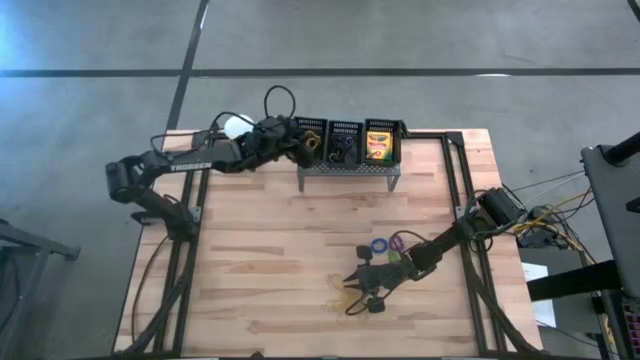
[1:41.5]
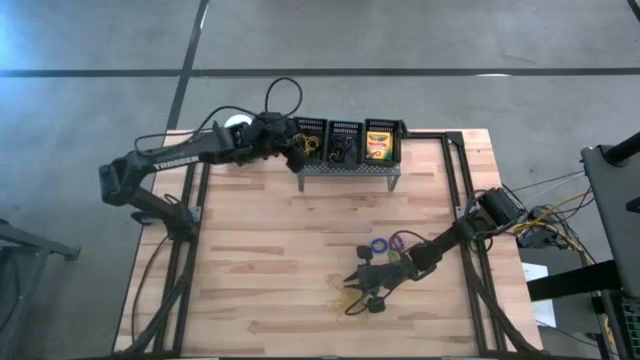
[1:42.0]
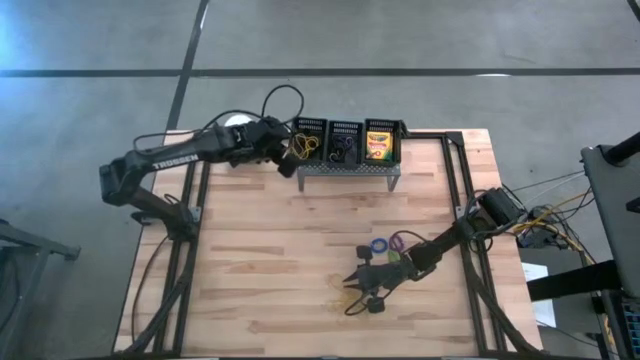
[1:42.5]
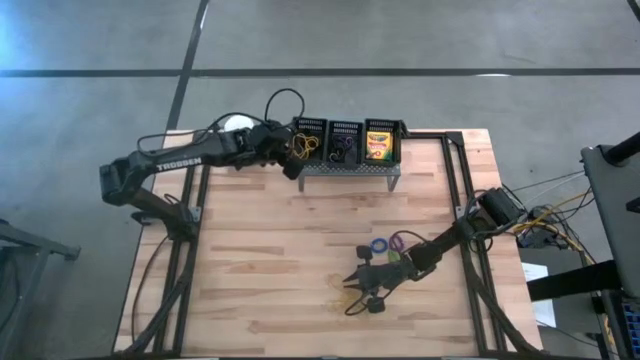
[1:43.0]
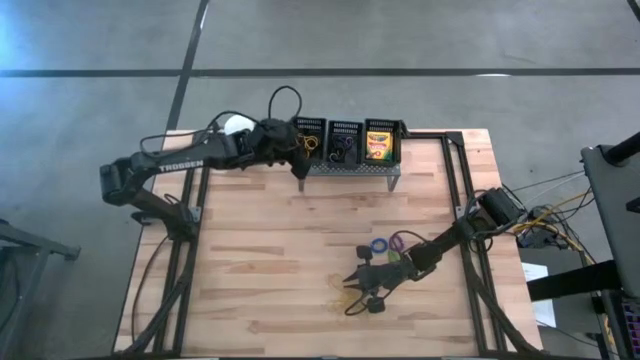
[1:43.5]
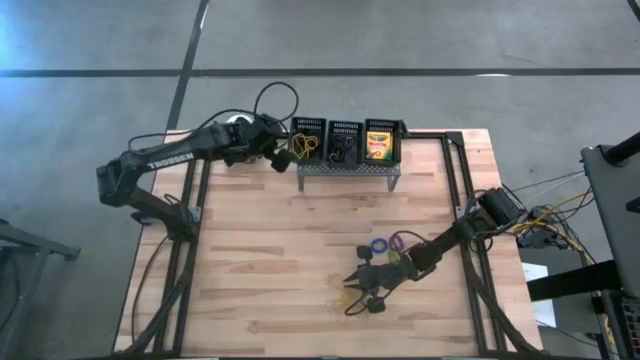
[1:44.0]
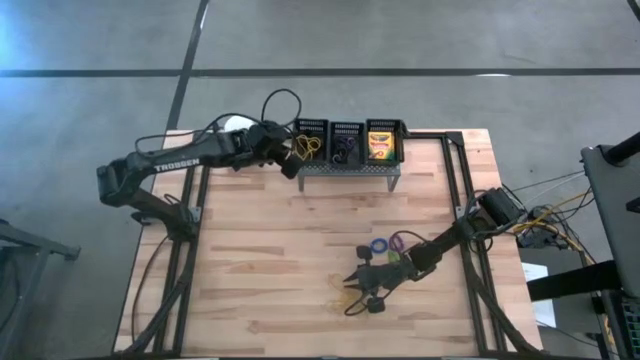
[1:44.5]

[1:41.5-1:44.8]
Task: Pick & Place Office Desk Supplies
Adjust the left black bin on the shelf

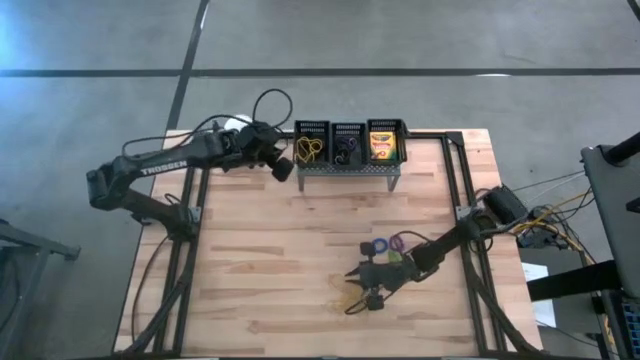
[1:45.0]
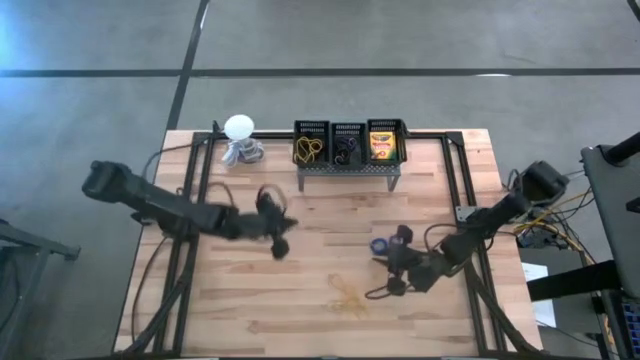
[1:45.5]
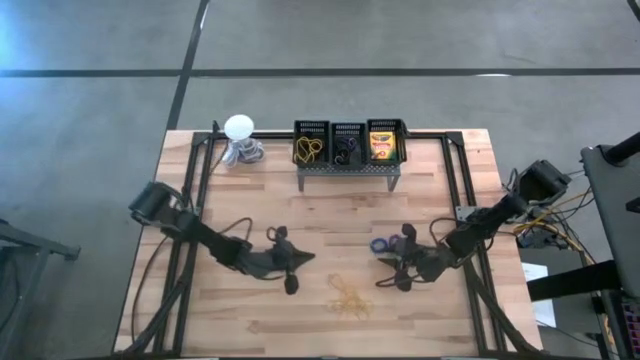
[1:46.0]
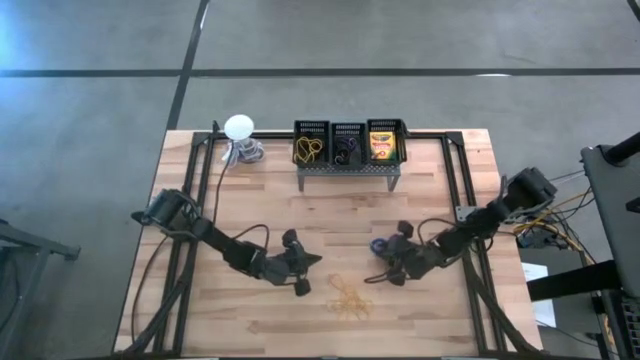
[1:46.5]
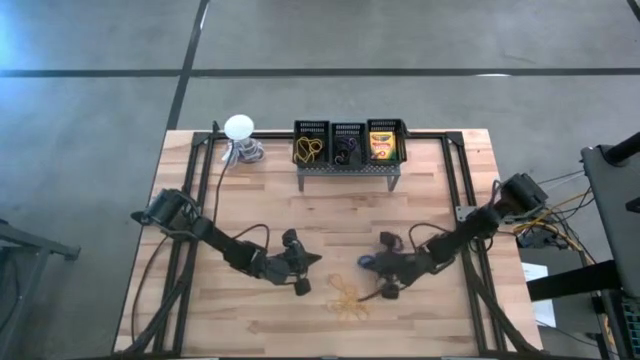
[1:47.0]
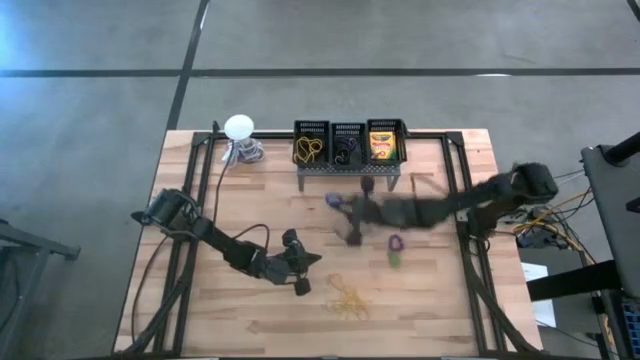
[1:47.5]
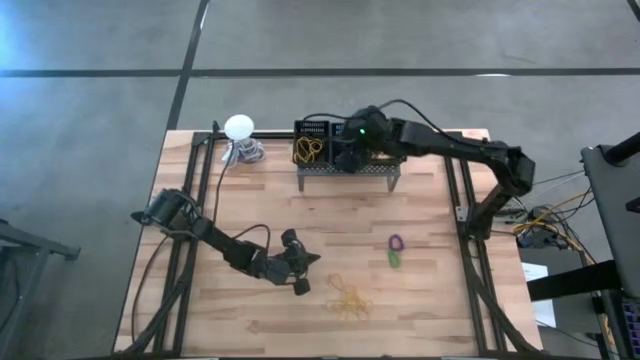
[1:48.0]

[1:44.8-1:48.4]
Put the blue keychain into the middle black bin on the shelf

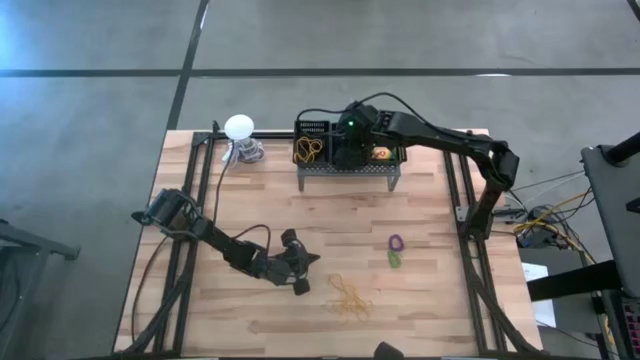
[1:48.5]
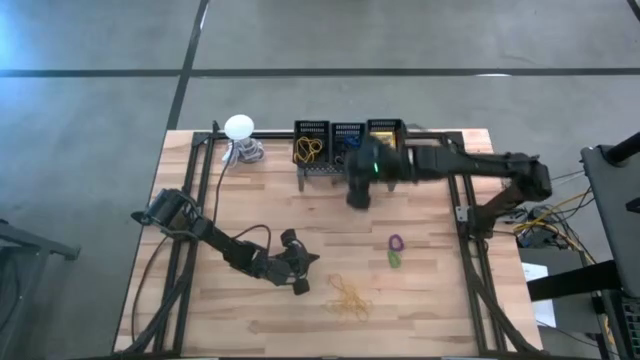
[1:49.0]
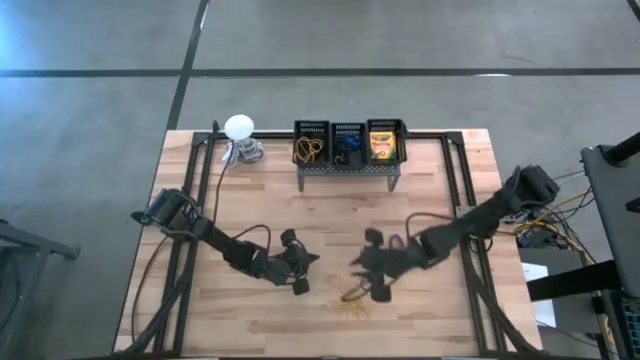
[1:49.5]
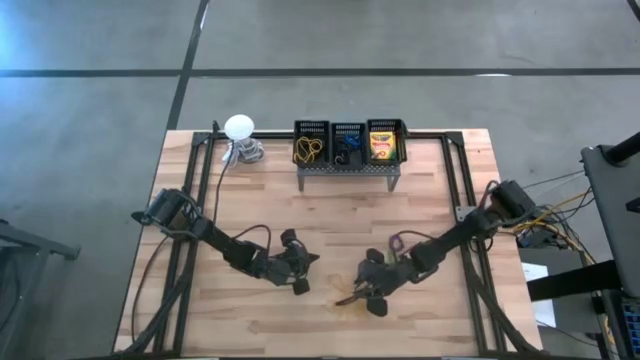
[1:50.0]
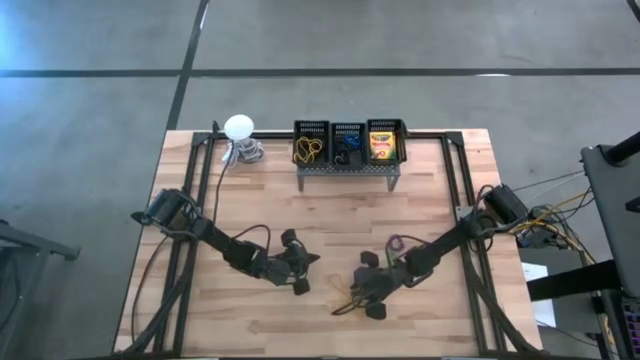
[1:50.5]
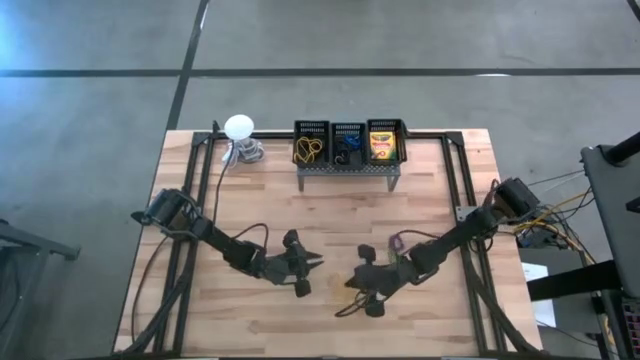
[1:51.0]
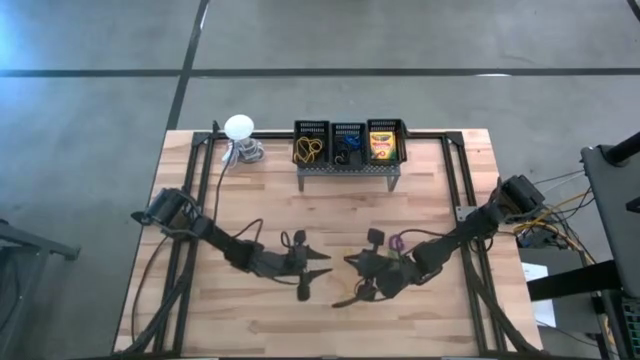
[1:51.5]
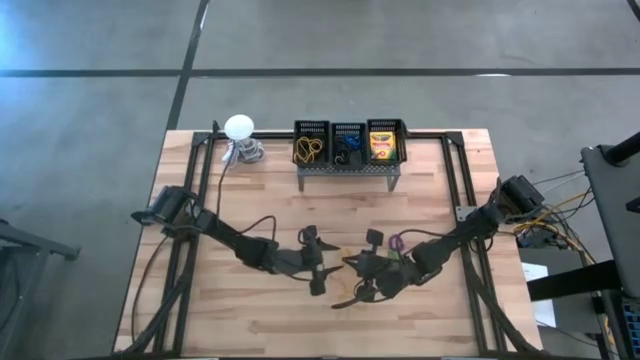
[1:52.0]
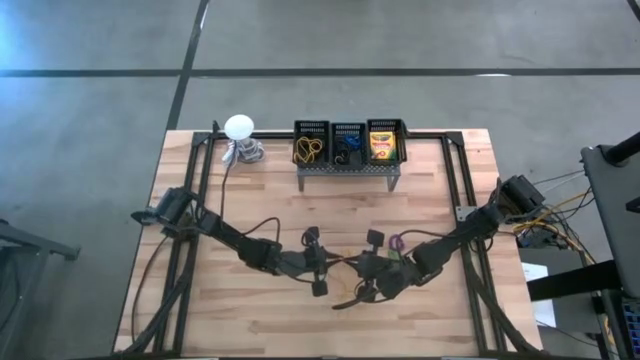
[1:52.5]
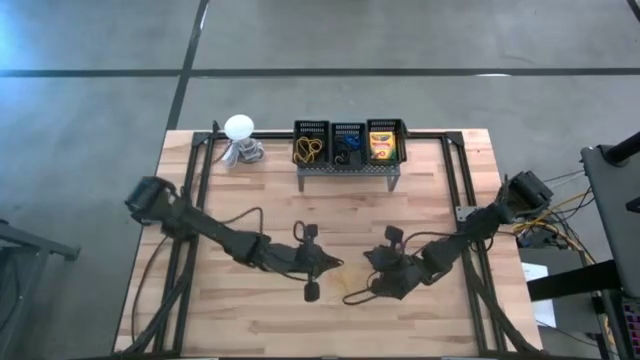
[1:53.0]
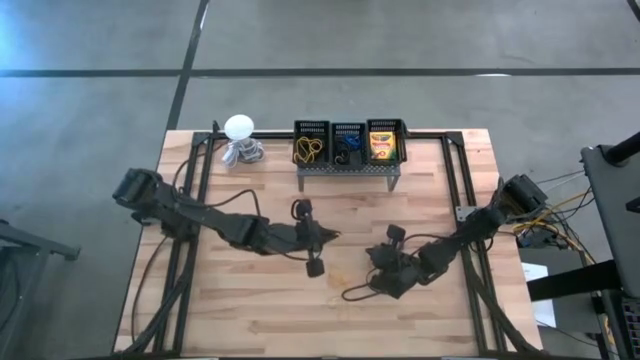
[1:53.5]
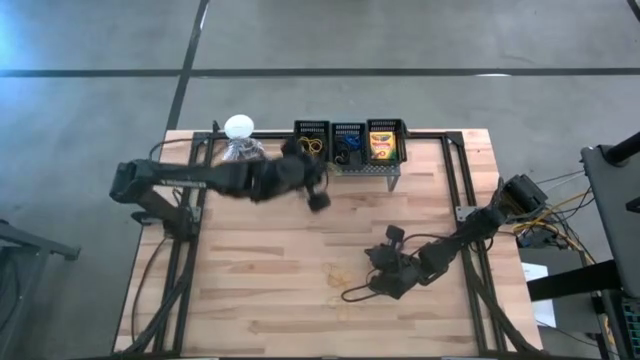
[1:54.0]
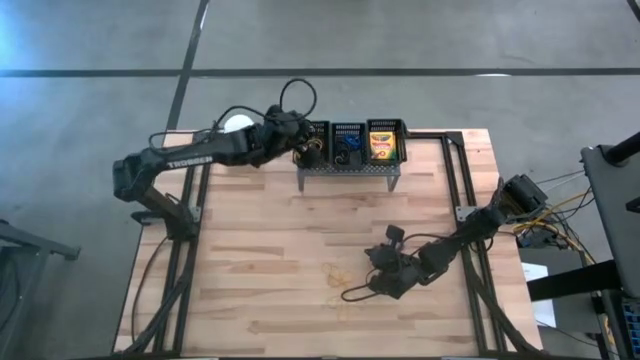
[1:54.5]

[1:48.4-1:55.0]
Put the yellow rubber band into the left black bin on the shelf

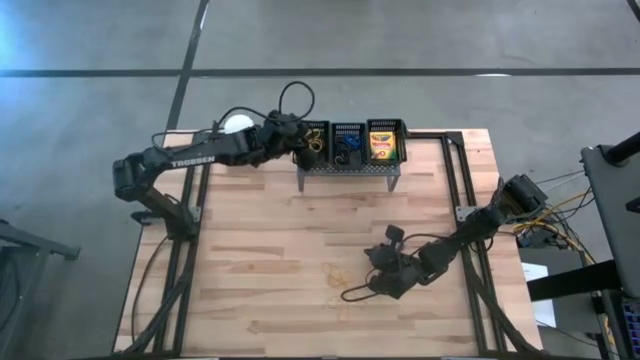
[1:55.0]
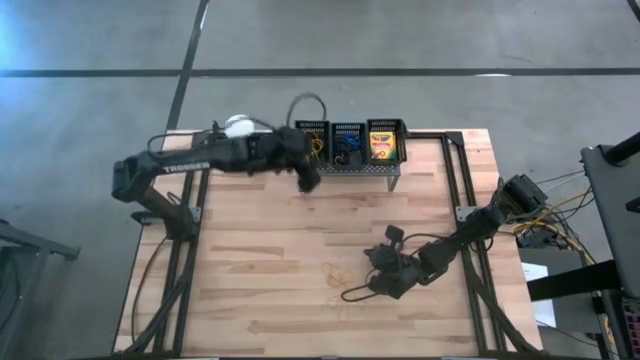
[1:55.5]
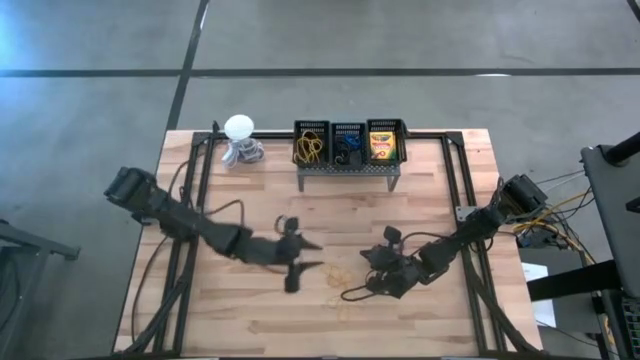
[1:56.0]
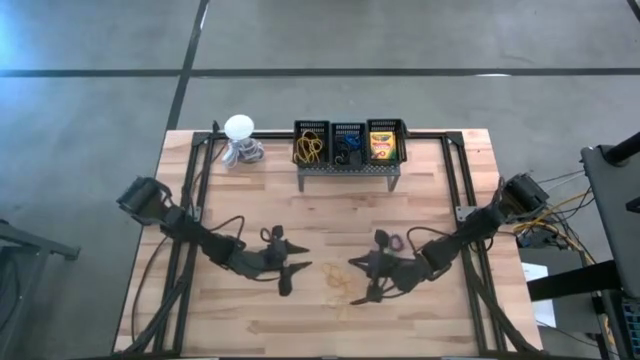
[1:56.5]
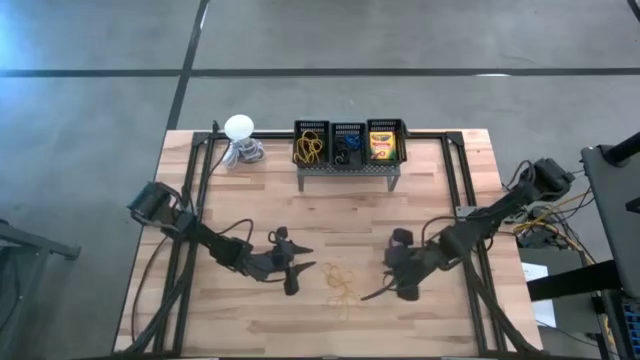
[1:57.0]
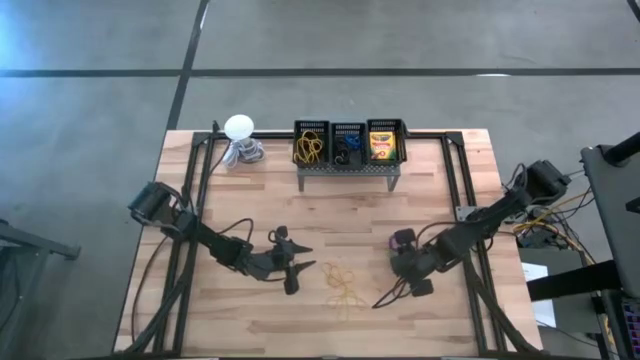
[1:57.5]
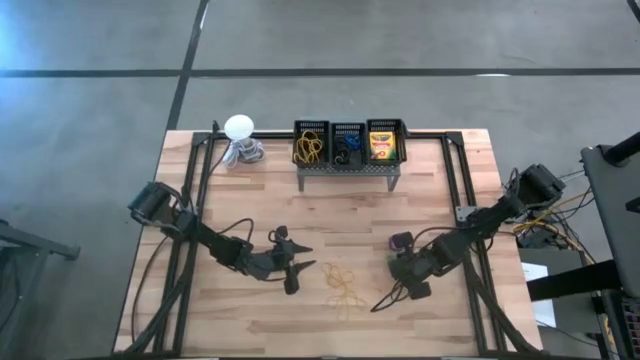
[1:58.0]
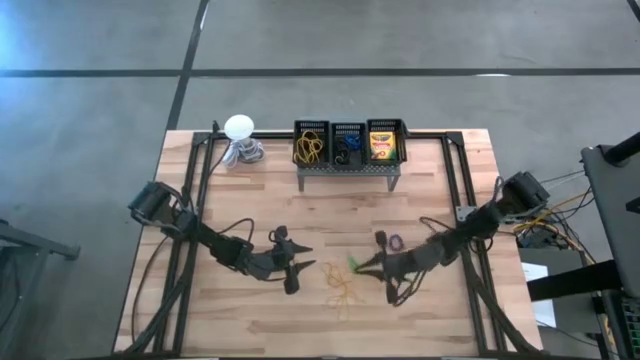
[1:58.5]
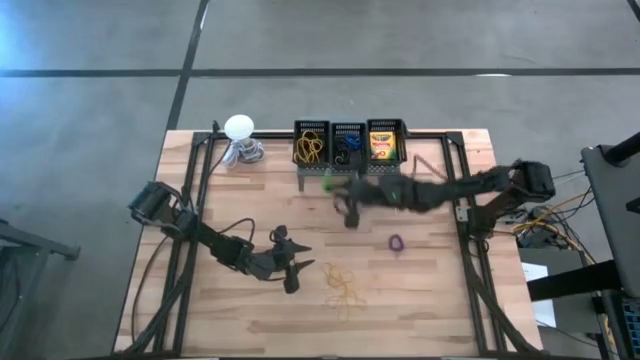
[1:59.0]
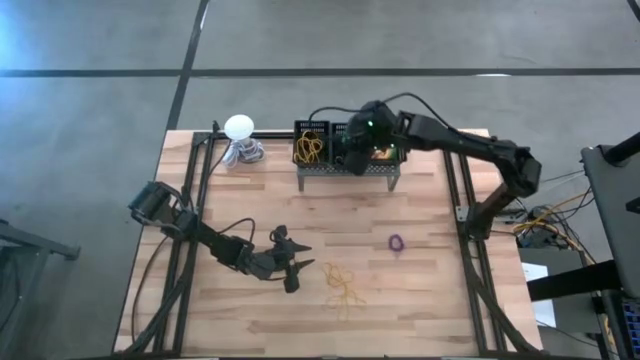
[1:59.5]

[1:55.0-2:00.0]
Put the green keychain into the middle black bin on the shelf

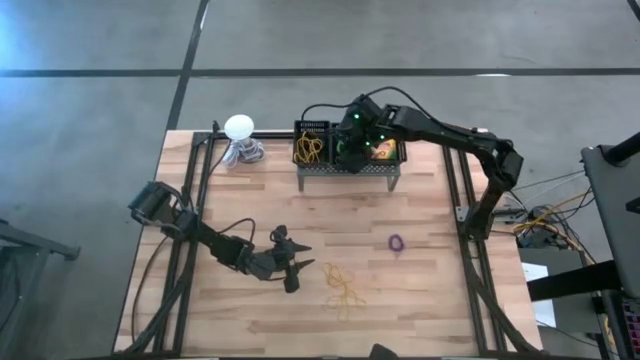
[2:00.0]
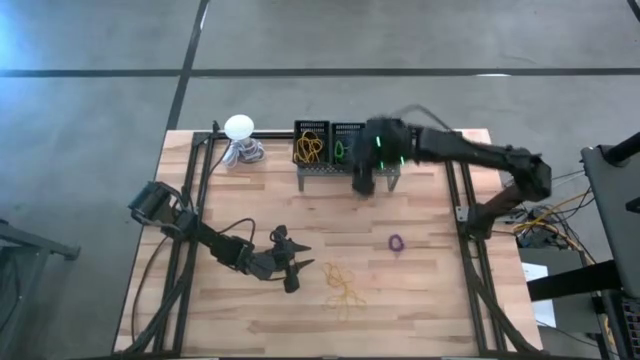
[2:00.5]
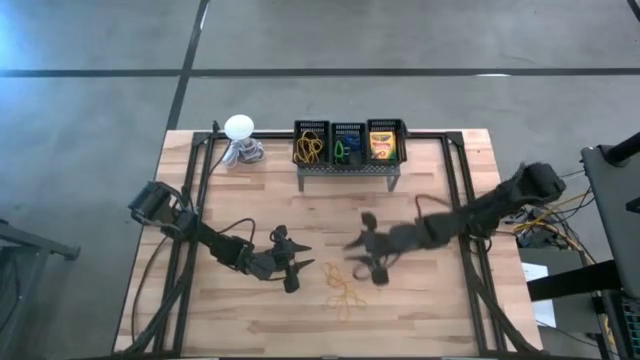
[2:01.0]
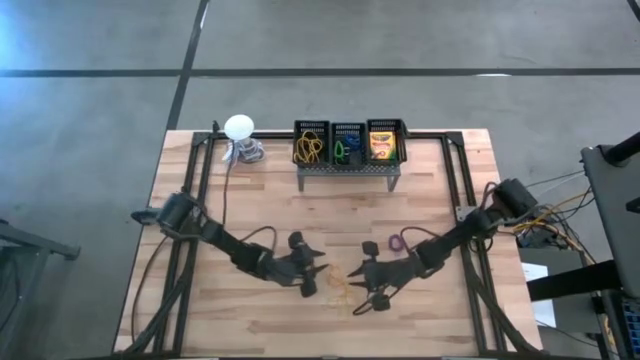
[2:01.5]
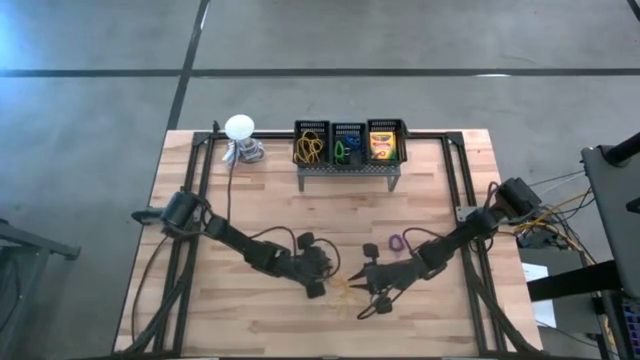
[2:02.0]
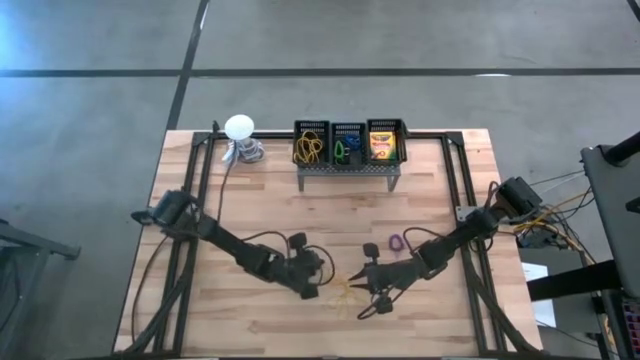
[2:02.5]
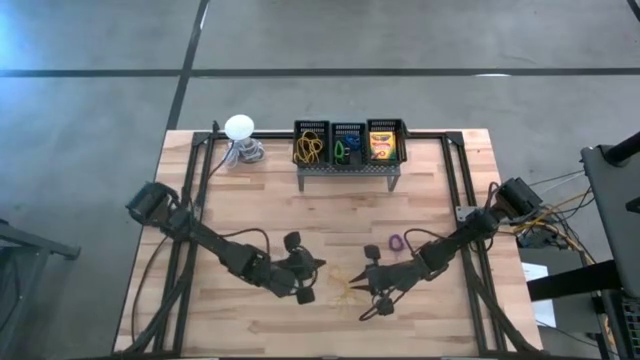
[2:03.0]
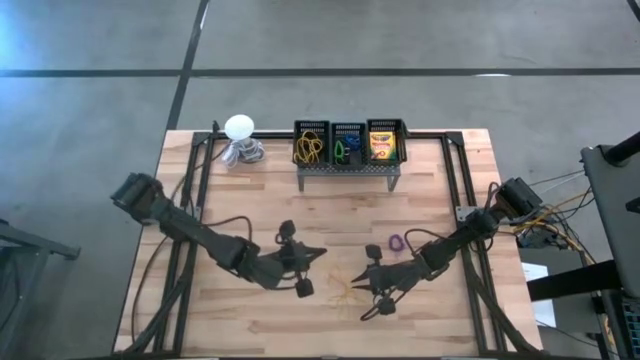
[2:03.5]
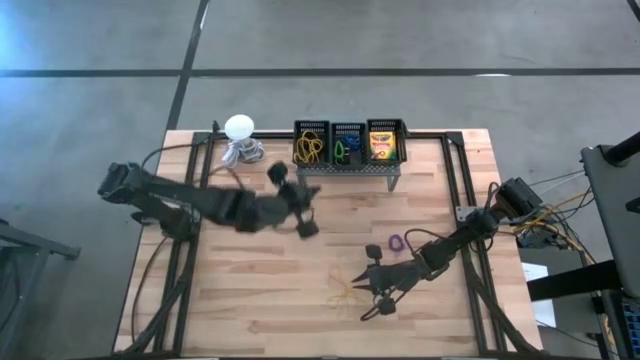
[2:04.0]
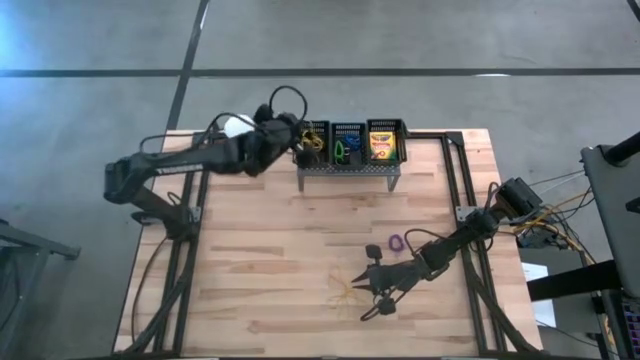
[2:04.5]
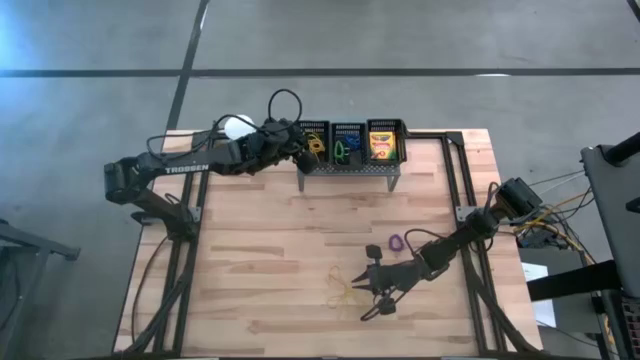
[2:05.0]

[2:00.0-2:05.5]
Put the yellow rubber band into the left black bin on the shelf
